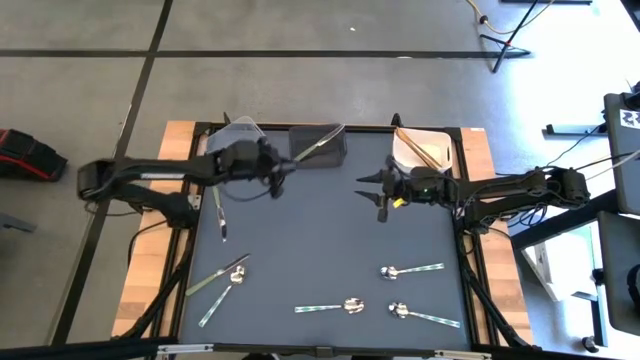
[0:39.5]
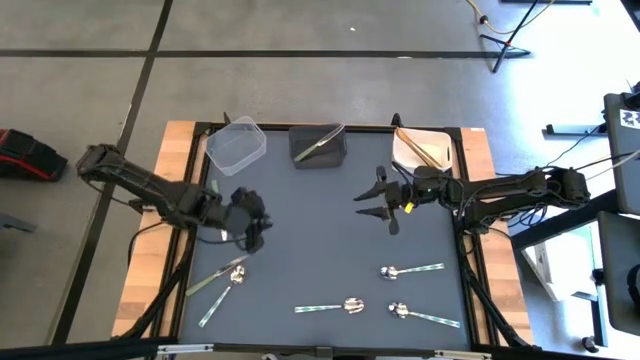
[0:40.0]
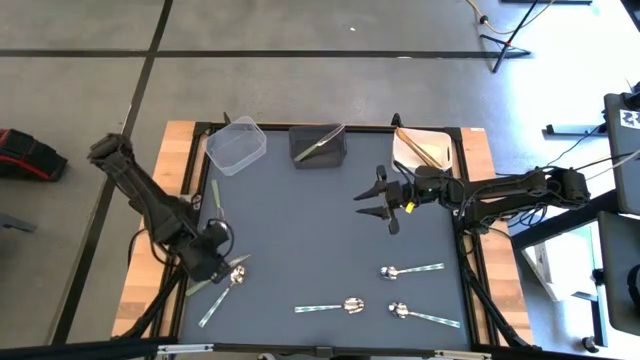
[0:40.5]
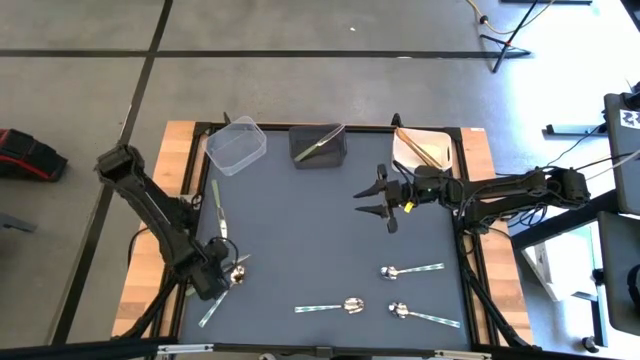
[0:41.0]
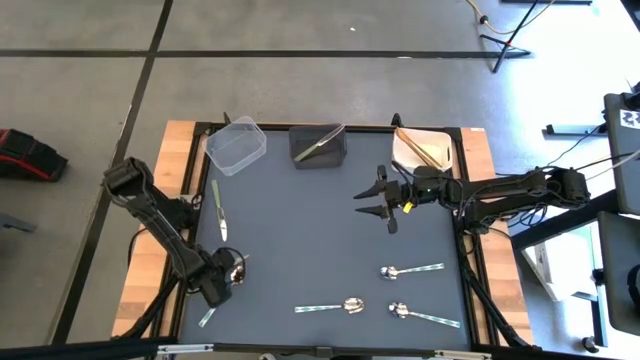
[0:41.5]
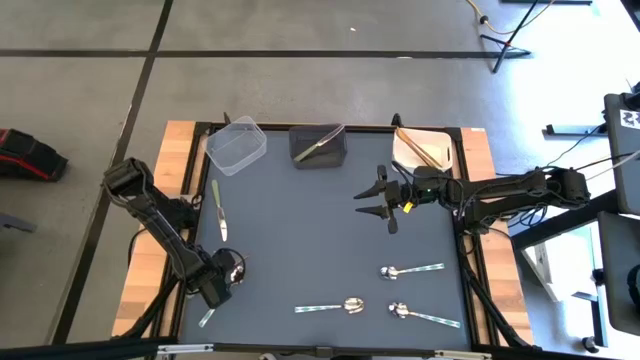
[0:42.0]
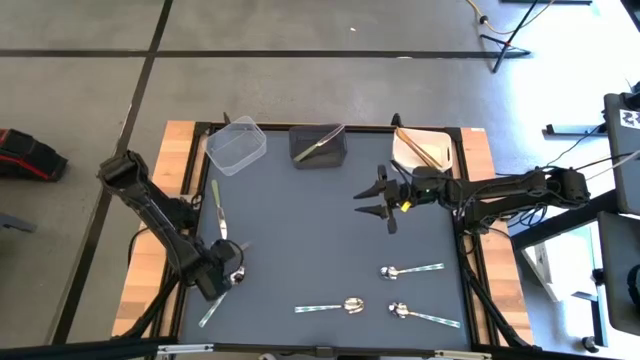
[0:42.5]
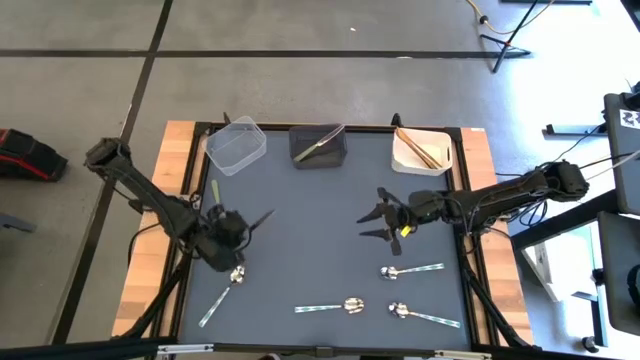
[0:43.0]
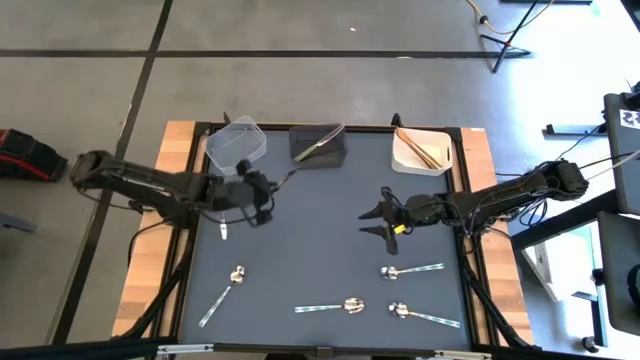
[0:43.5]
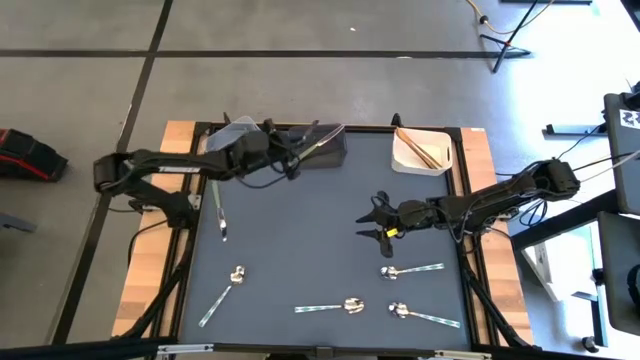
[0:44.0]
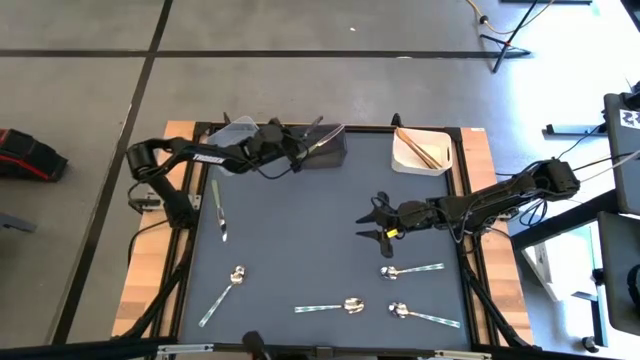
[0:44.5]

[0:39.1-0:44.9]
Task: Sort silverware by color (type)
Put the bottom green table knife into the black bin

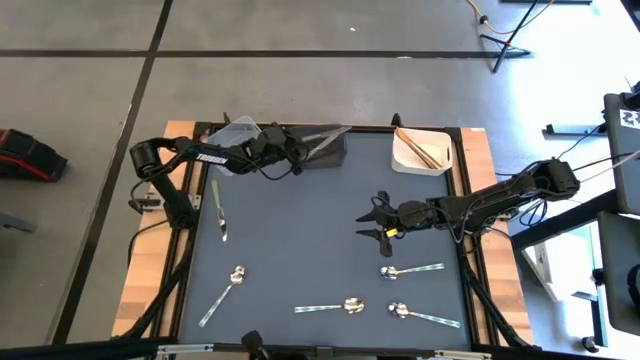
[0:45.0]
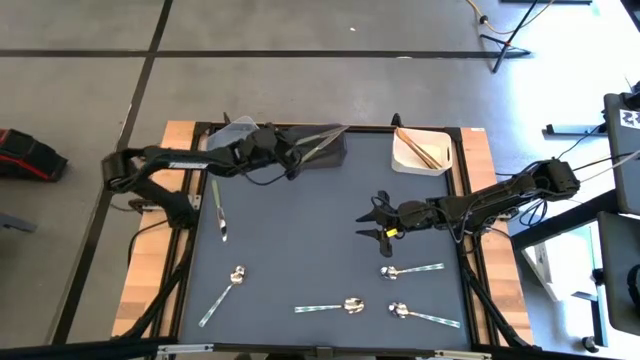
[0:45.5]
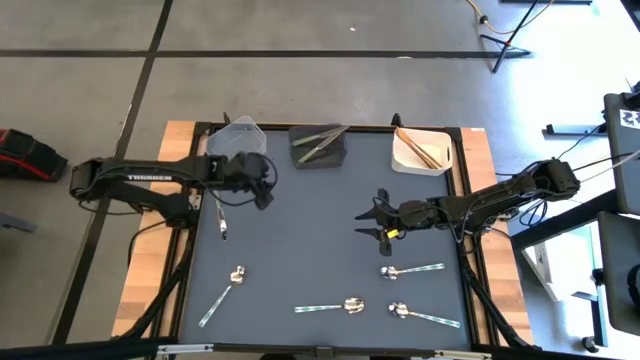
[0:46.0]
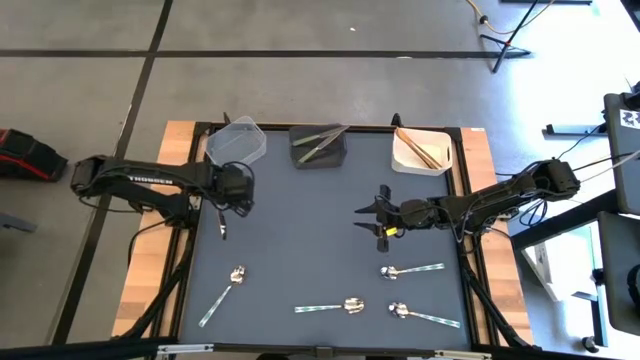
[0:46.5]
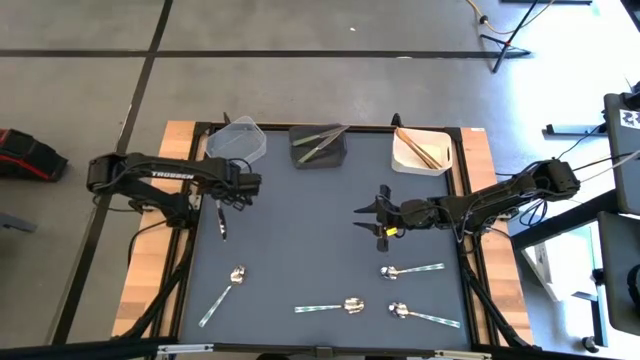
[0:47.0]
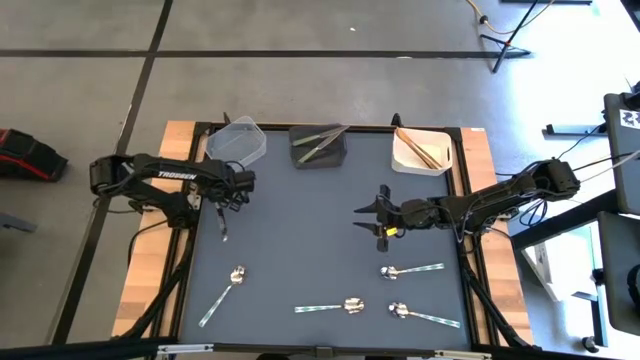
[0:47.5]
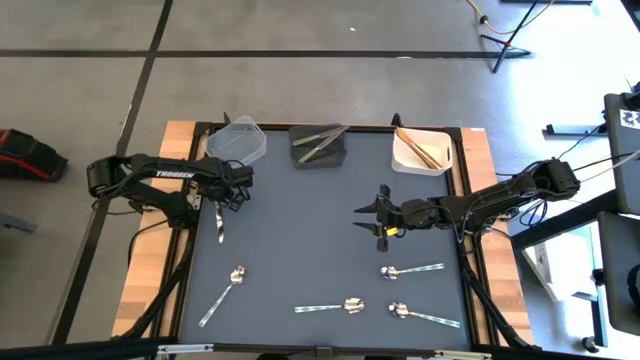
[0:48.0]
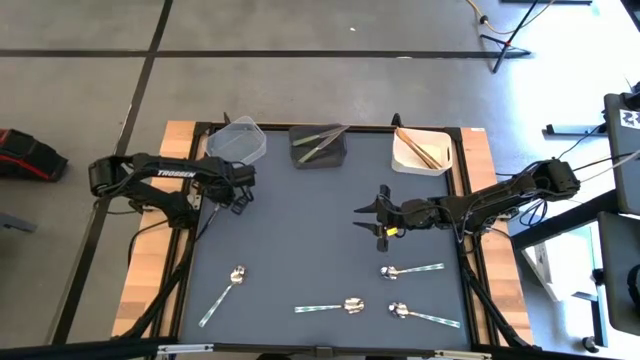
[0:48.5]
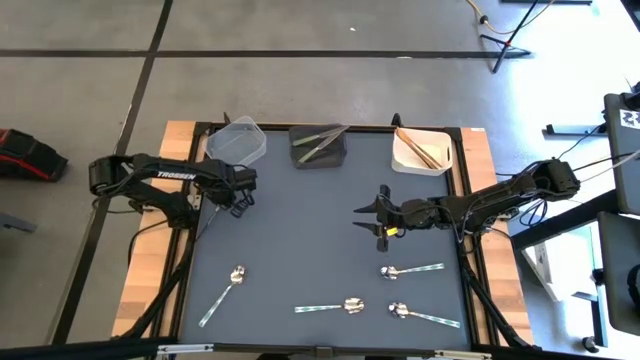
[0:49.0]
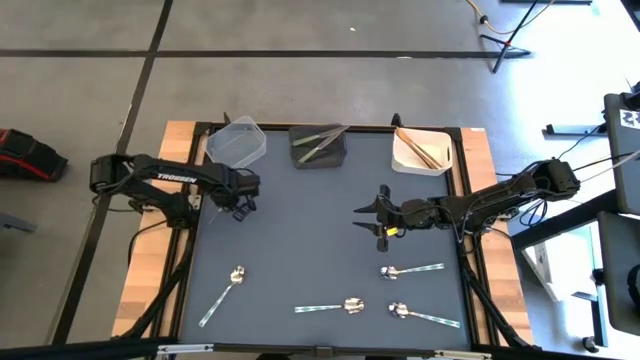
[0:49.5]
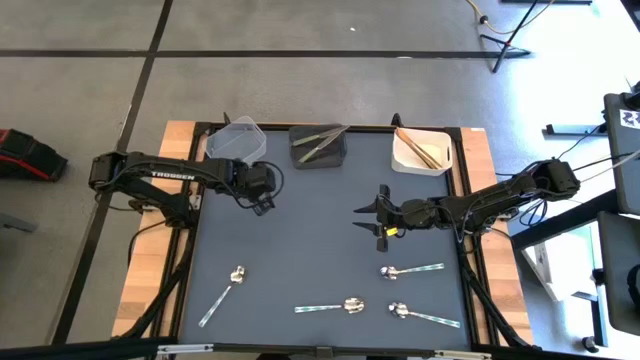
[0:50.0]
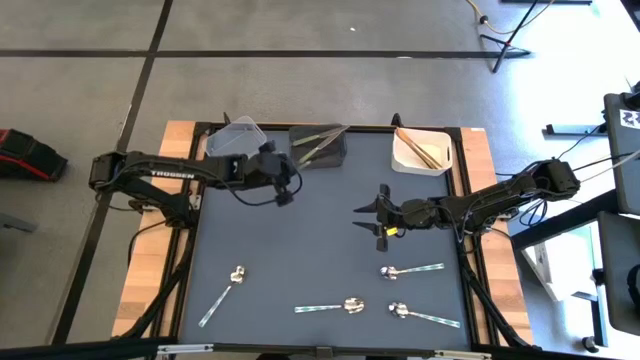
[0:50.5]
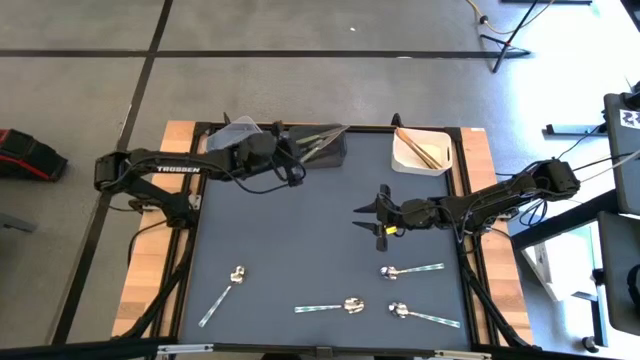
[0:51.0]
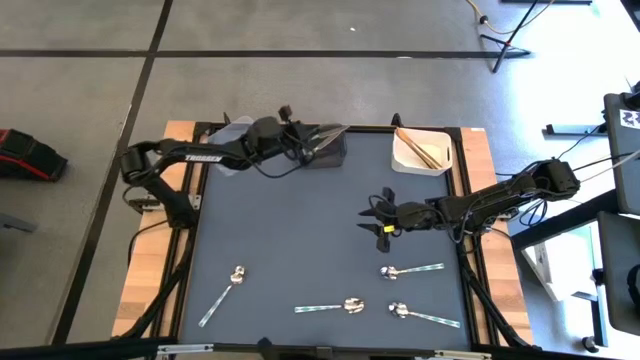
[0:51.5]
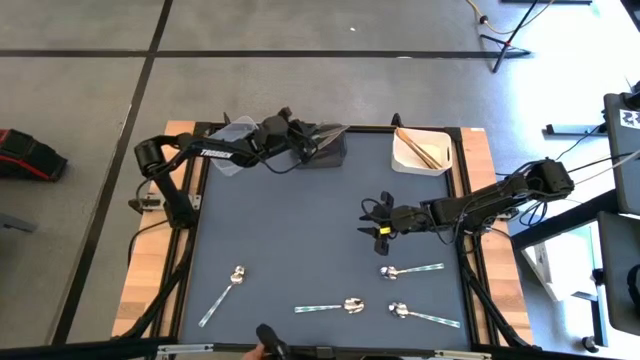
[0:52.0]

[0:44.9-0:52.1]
Put the green table knife into the black bin

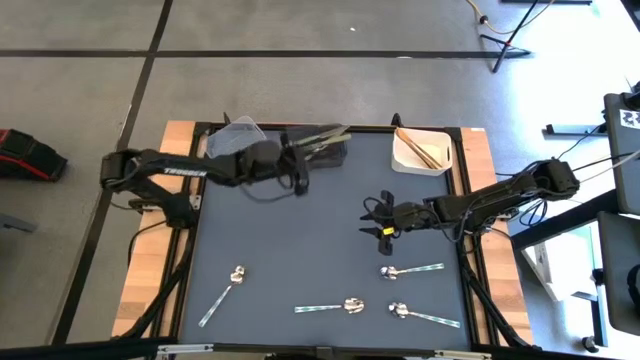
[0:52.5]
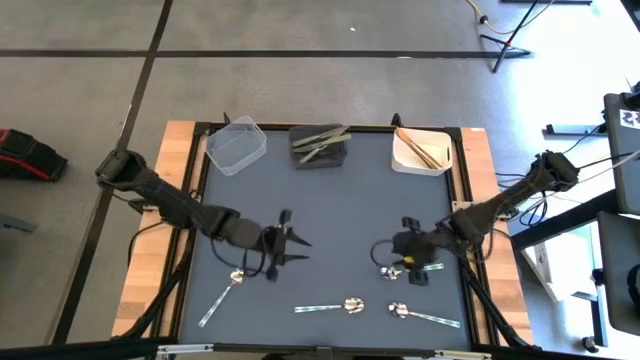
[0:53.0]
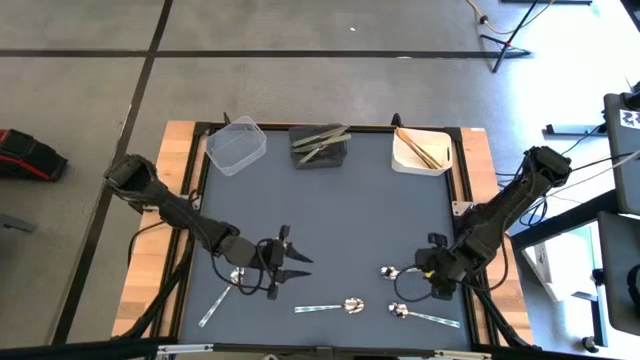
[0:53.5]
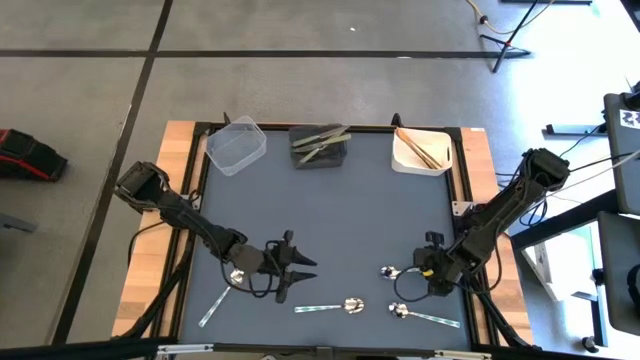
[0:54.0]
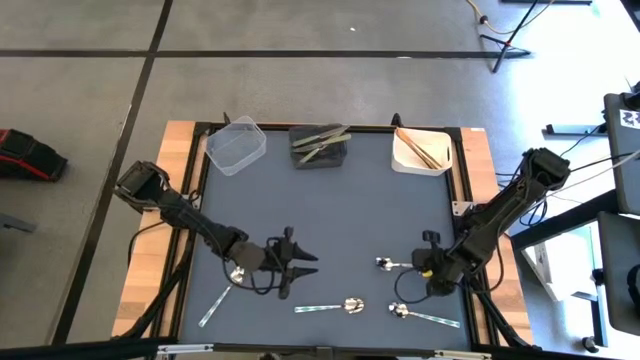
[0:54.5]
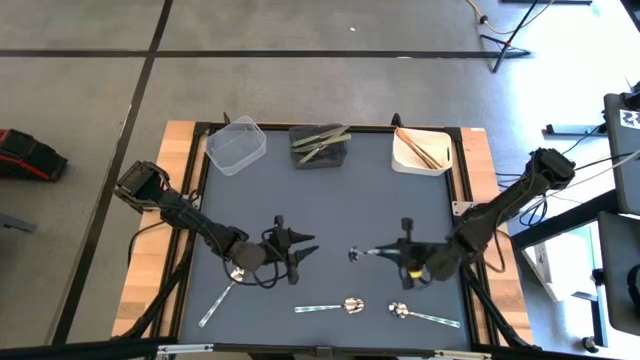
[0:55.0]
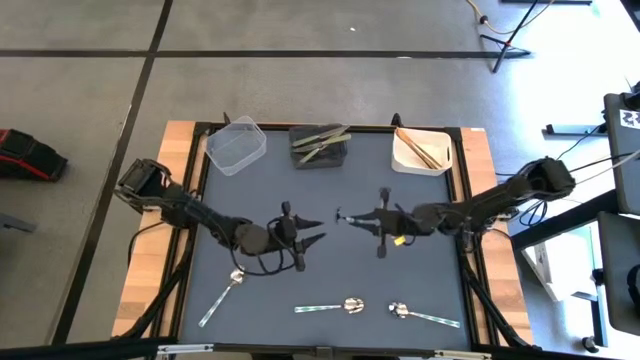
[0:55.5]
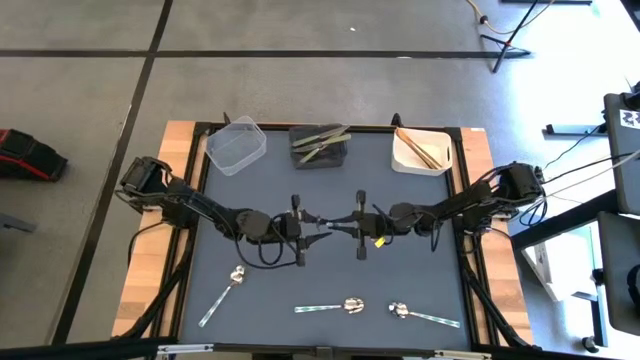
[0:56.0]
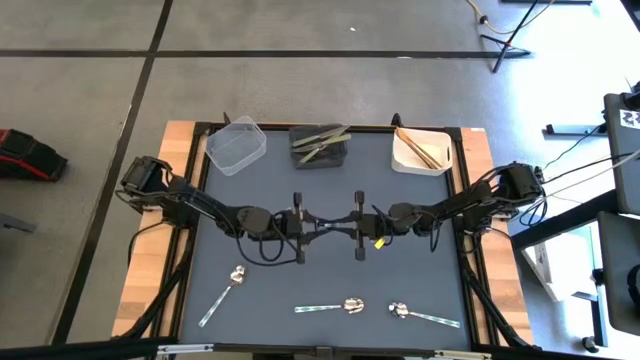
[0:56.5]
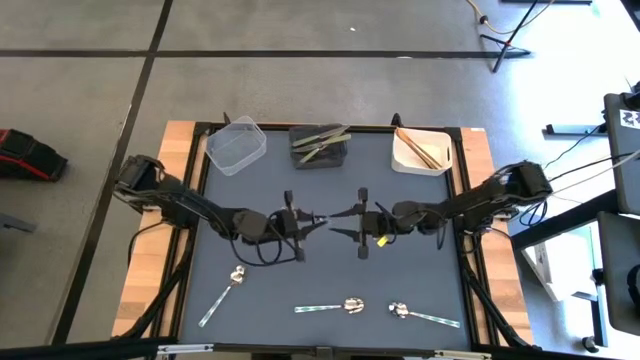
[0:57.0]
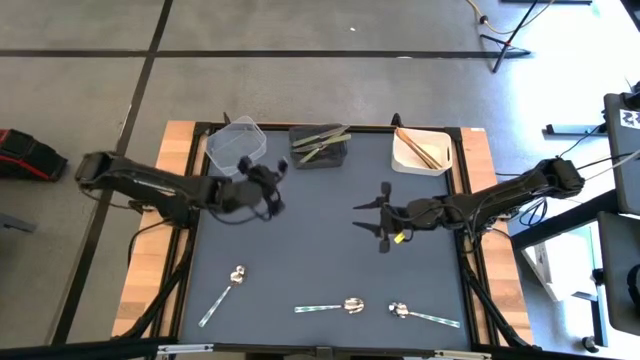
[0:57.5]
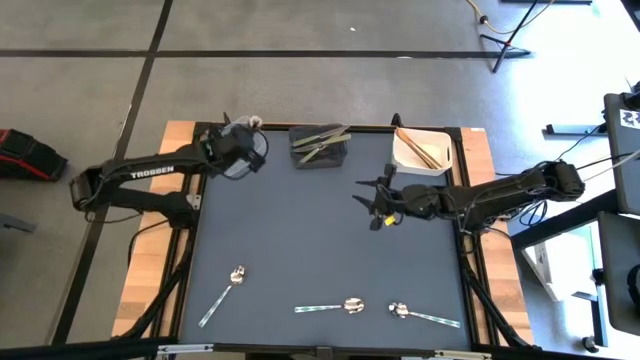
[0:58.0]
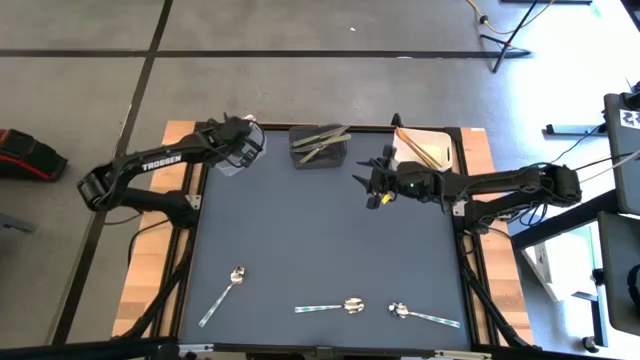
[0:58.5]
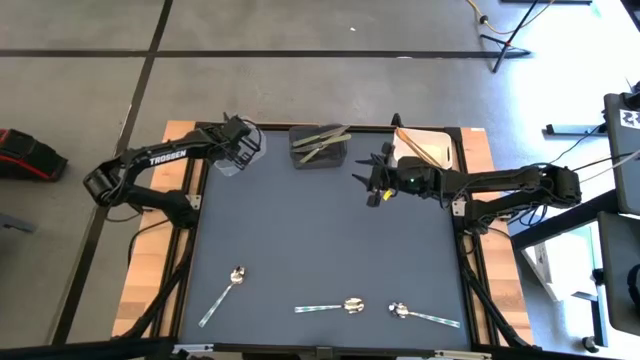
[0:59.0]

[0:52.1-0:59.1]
Put the top right green patterned spoon into the transparent bin
